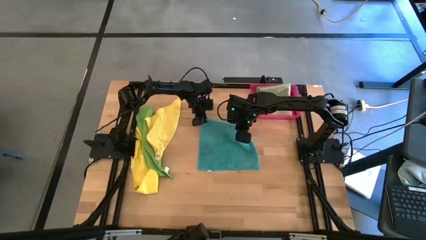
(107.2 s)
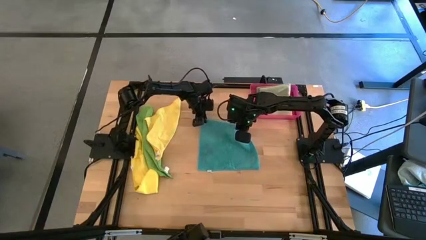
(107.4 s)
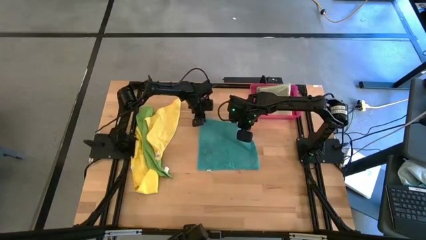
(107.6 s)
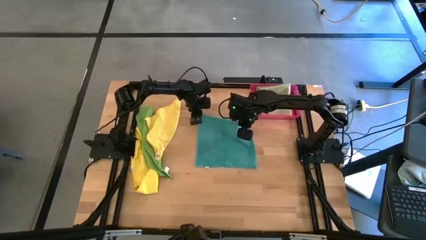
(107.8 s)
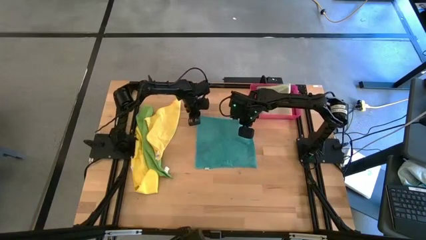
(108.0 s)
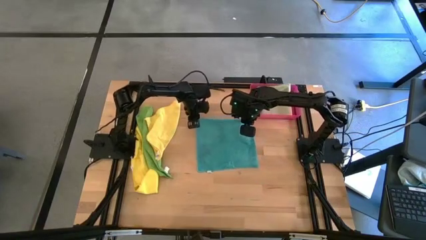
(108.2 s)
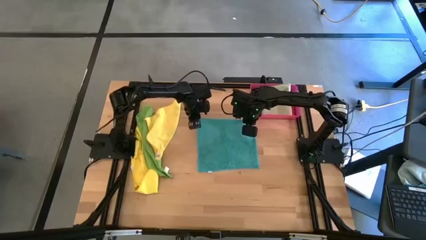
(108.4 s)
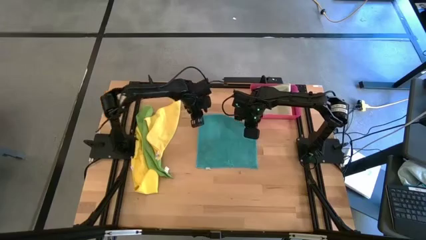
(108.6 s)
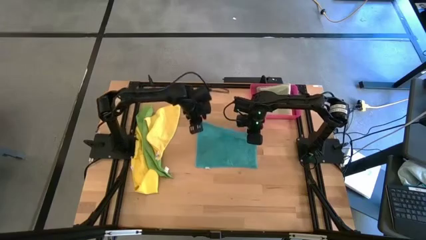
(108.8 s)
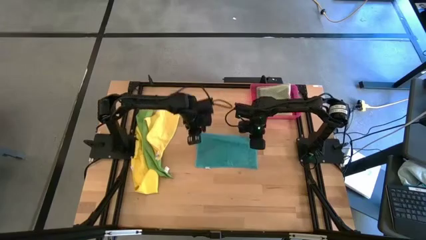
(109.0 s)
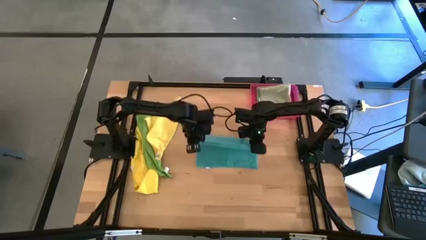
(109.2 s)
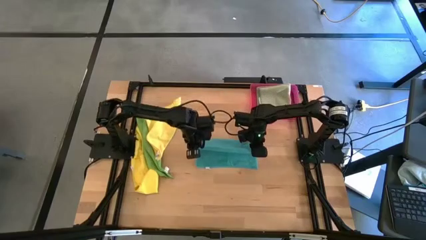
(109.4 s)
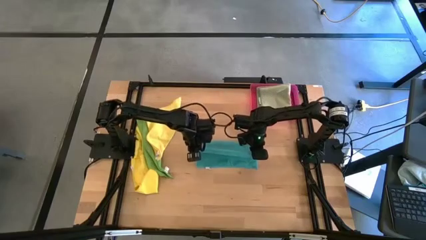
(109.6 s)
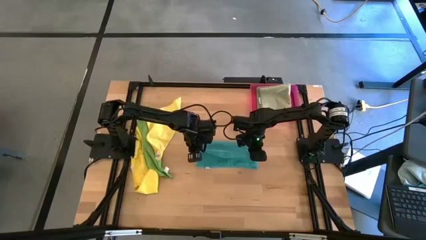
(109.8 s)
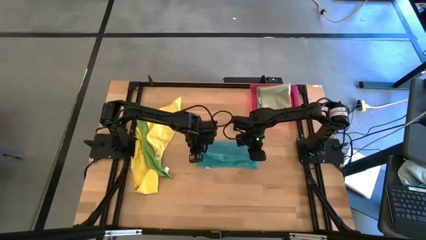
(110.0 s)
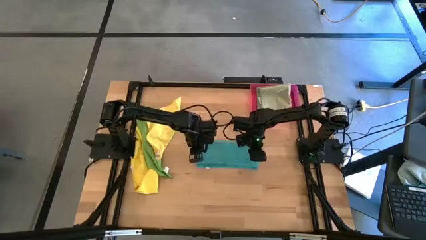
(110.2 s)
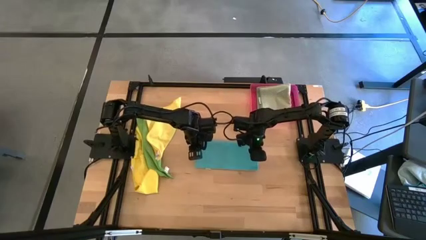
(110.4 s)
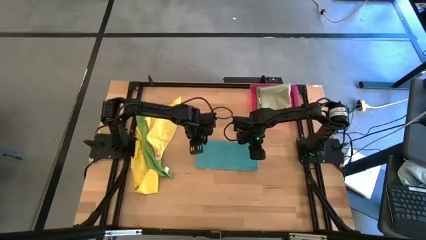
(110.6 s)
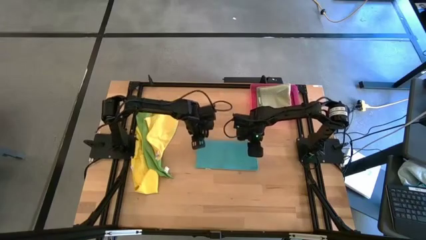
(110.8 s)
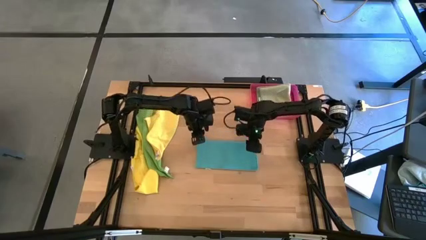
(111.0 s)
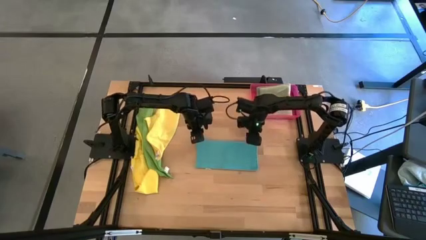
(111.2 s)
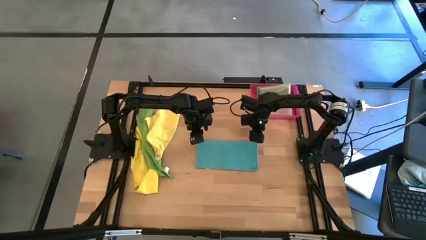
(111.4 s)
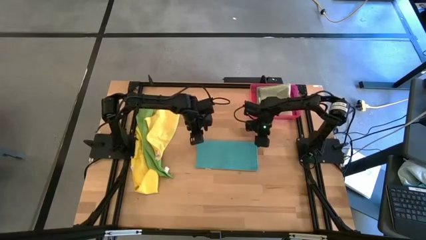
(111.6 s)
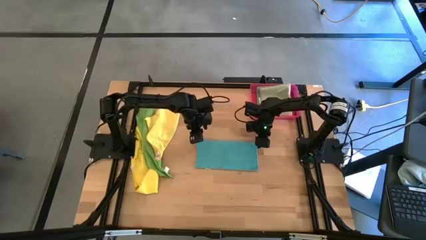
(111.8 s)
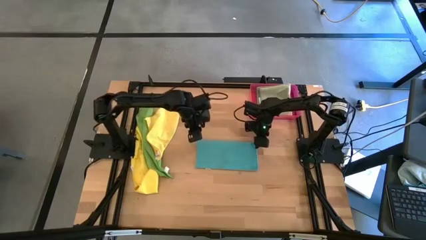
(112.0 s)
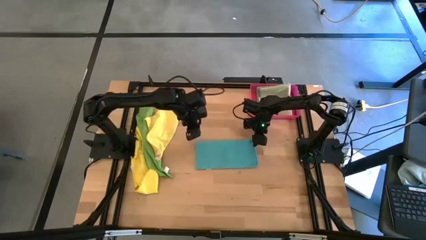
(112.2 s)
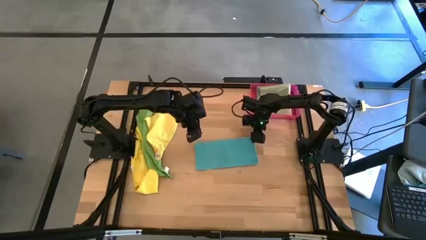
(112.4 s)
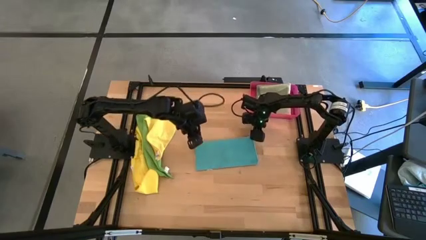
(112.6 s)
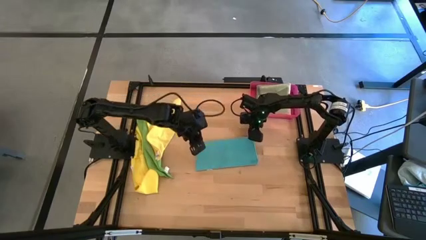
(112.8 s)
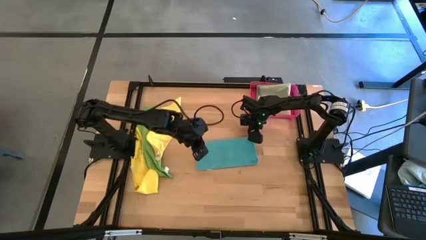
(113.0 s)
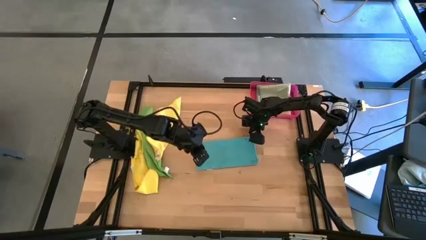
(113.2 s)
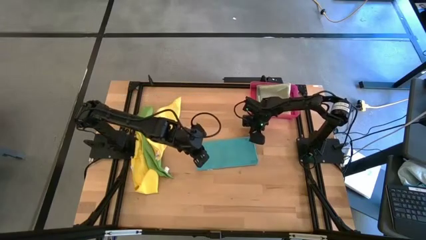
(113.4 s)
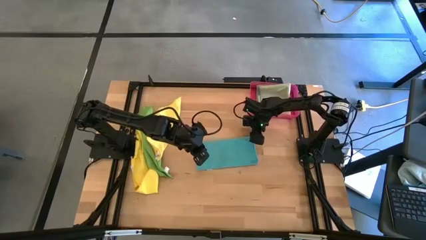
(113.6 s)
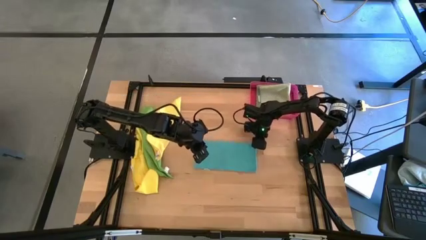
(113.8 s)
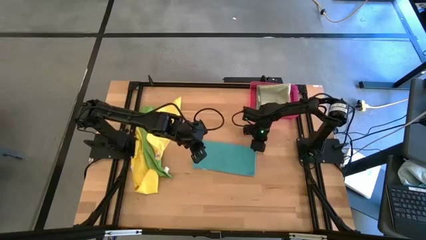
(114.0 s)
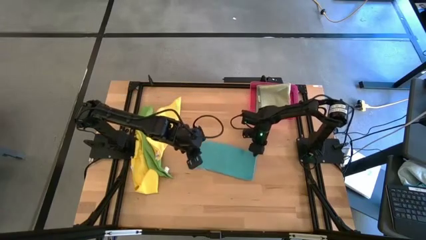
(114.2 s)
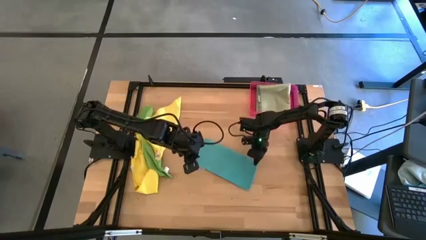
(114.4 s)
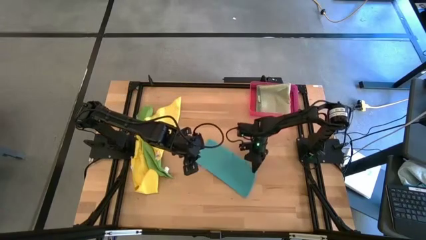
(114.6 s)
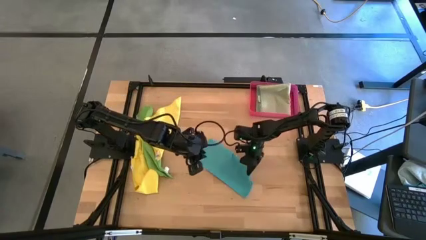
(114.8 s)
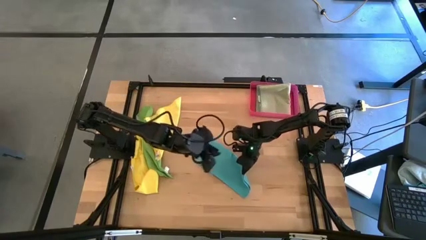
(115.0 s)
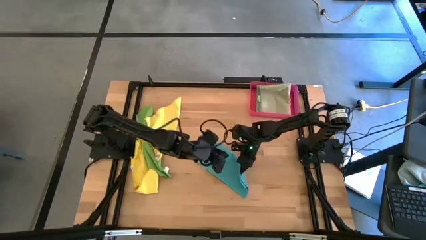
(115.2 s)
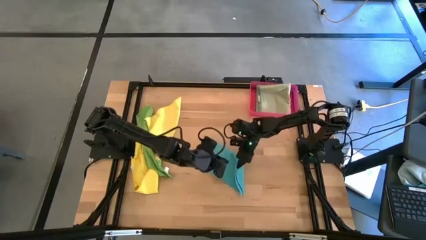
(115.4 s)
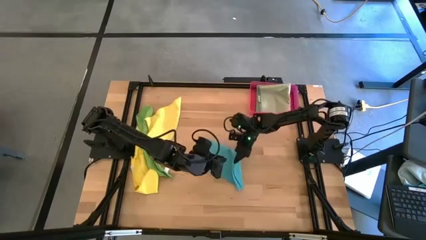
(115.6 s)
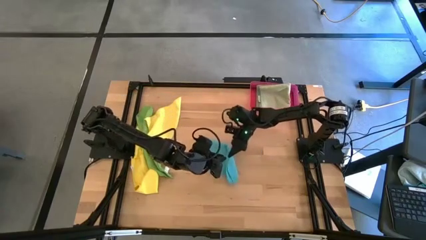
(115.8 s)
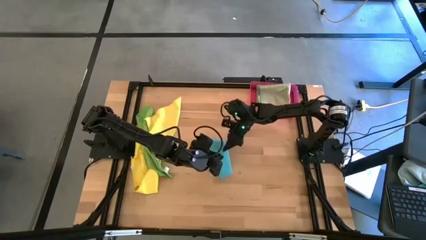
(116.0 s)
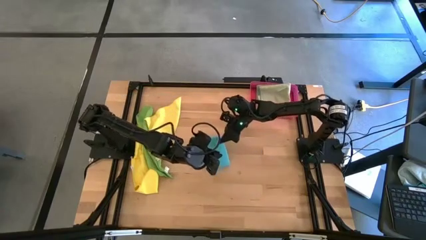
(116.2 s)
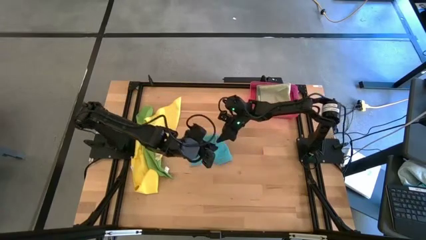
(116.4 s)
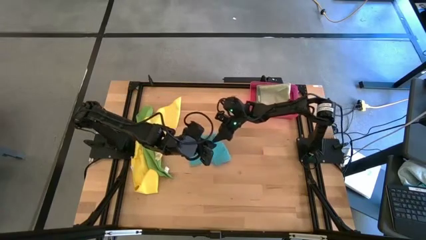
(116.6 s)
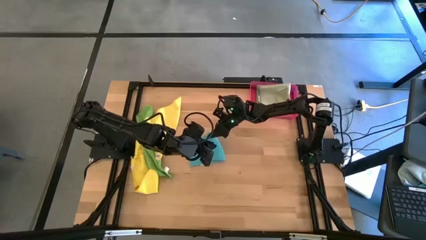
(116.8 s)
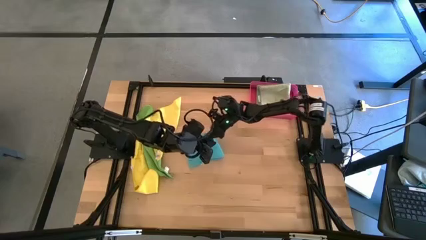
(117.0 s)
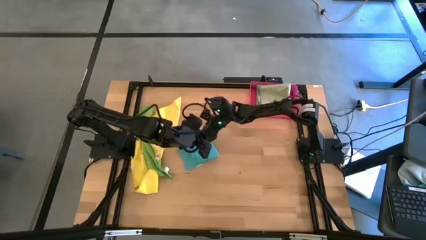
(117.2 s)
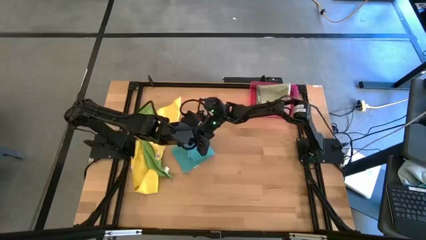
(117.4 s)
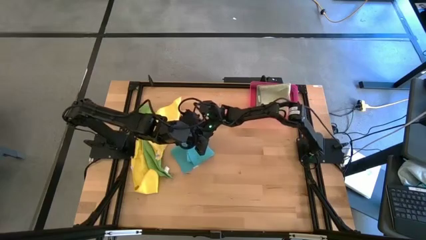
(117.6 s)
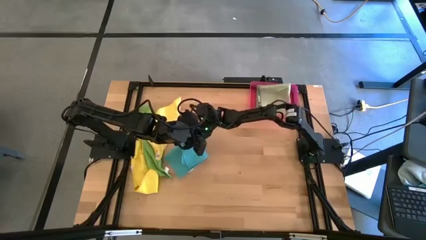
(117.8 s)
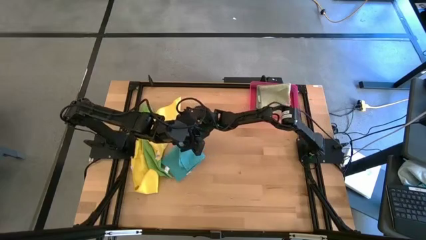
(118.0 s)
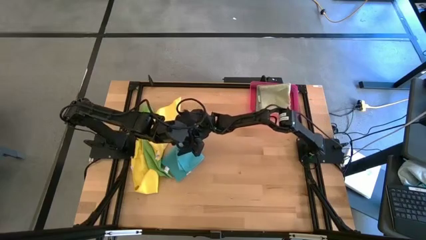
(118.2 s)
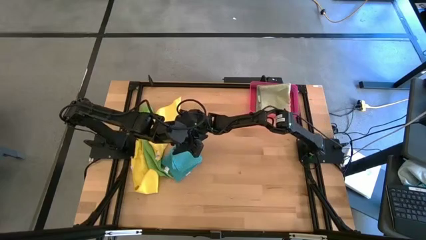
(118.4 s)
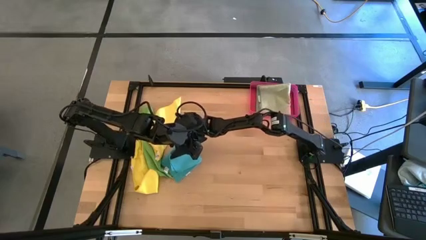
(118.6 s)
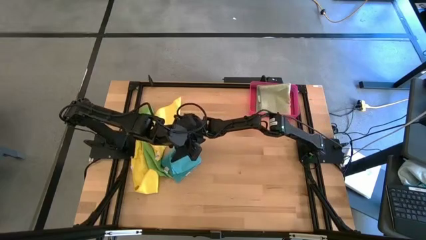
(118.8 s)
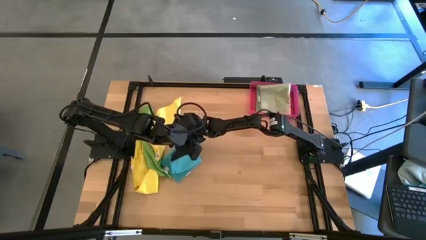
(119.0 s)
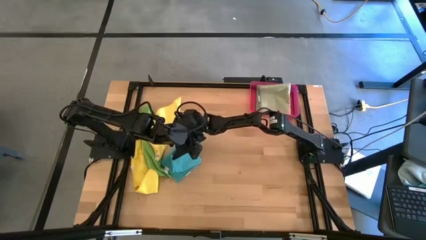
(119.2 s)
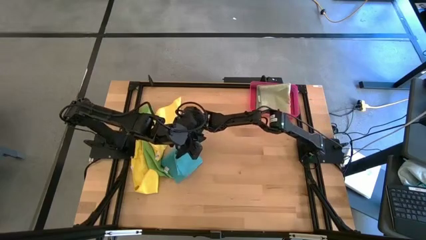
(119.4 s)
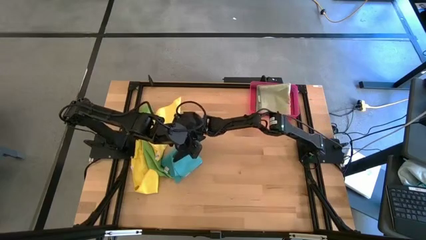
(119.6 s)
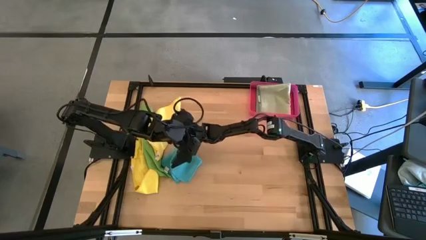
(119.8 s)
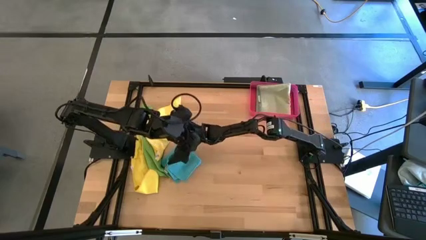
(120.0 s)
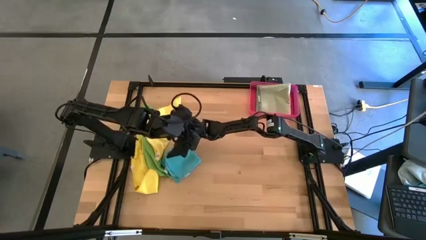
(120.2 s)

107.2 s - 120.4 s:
Task: Fold microfiber towels
Fold the blue towel

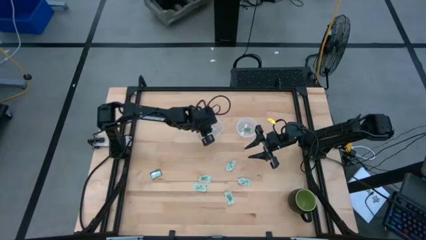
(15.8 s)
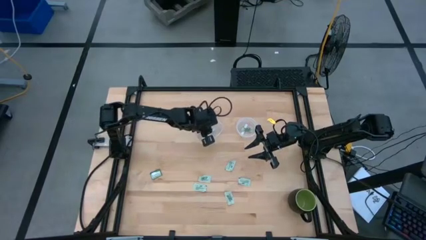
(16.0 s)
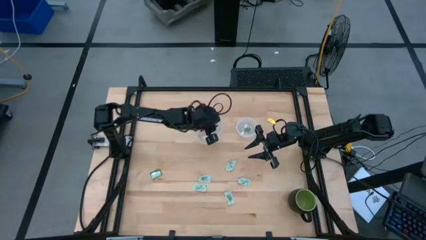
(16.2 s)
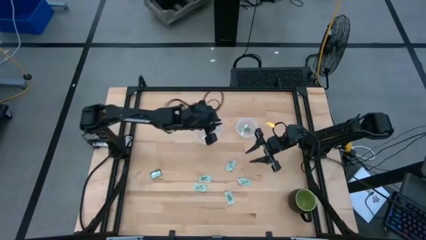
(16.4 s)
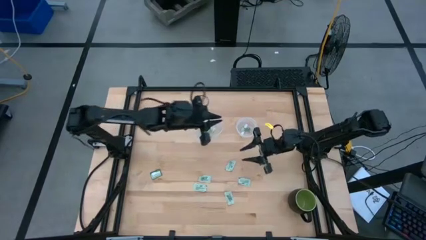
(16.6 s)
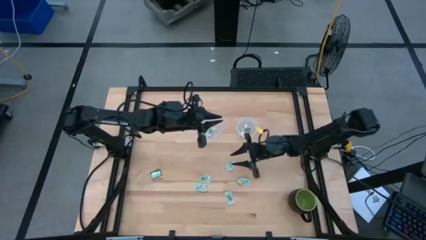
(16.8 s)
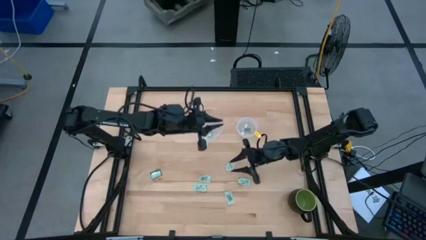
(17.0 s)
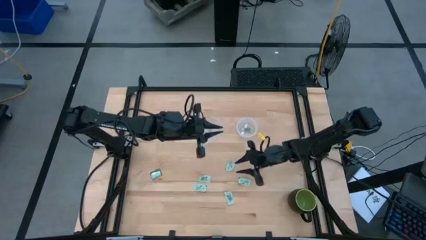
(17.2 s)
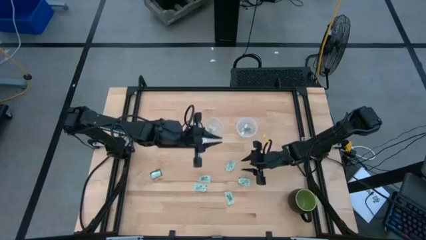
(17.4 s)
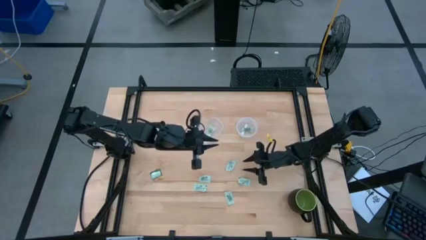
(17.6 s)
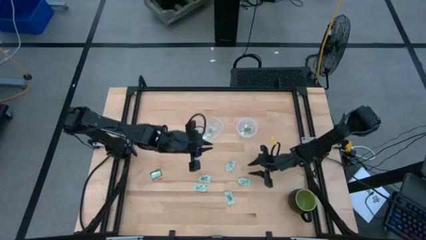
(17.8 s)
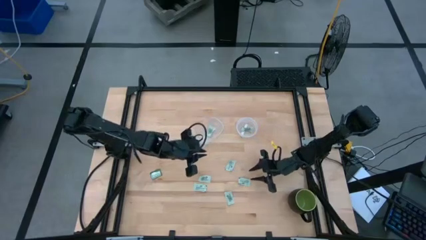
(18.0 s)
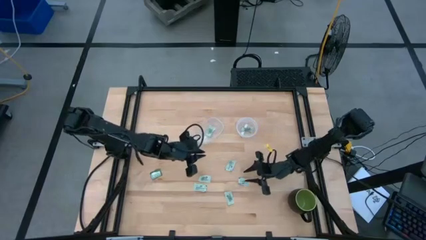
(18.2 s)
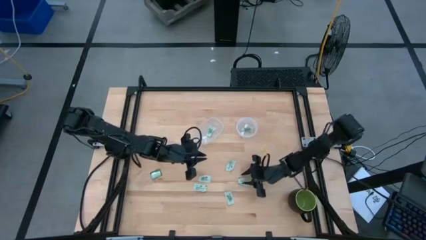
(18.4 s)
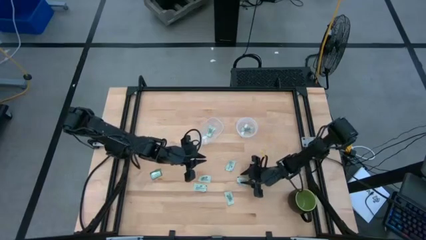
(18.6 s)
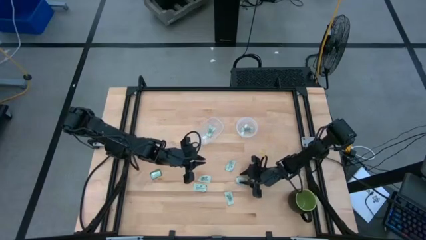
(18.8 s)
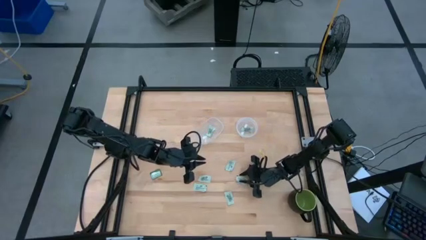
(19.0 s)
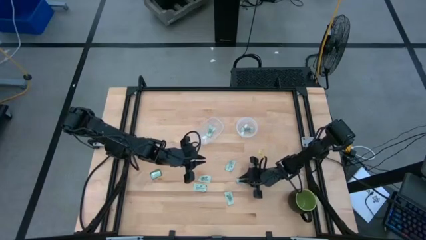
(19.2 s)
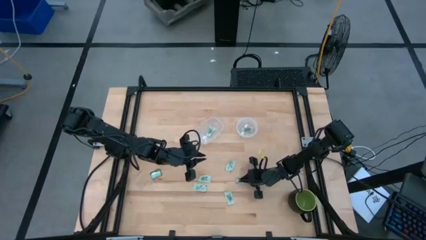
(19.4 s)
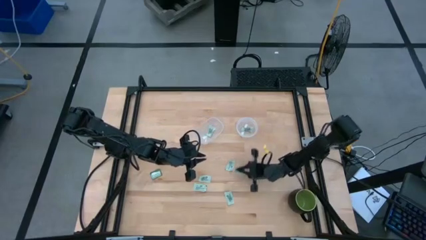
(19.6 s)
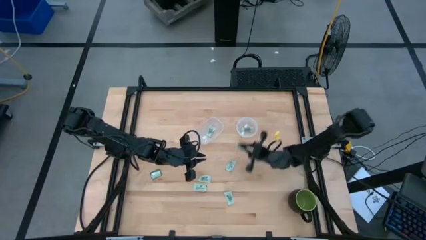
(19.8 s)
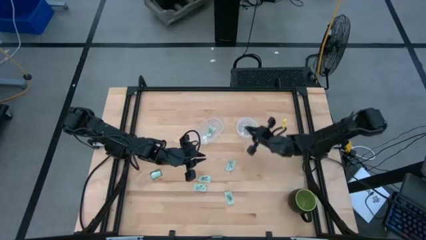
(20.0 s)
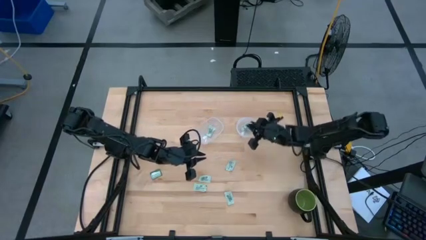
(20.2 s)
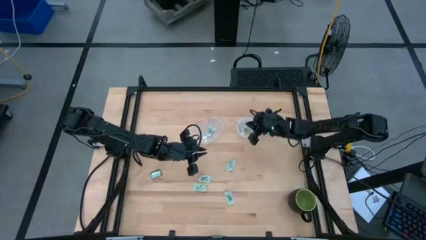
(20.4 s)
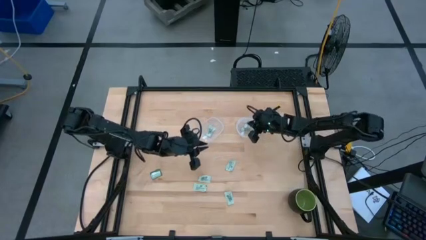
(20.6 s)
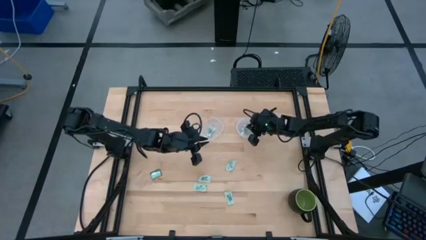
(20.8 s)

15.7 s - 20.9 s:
Task: Pick and place Stevia / Truvia into bins
Put the stevia packet into the right transparent container
